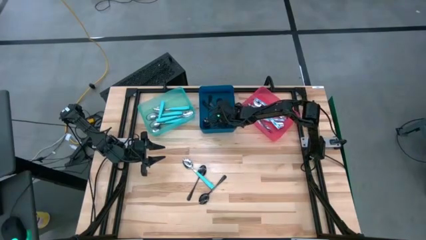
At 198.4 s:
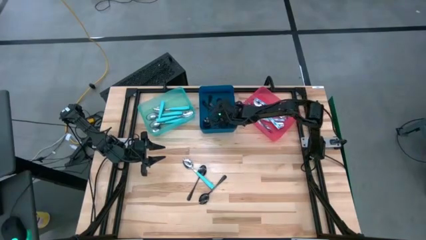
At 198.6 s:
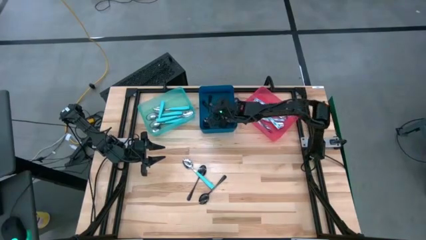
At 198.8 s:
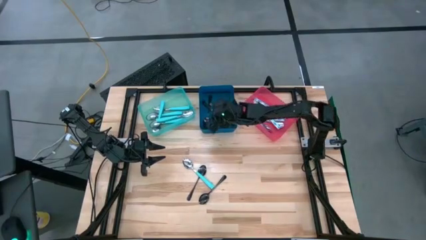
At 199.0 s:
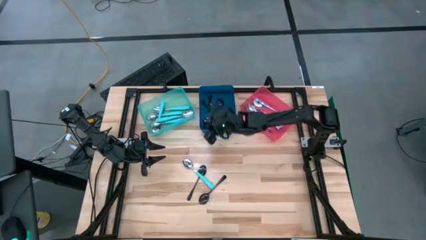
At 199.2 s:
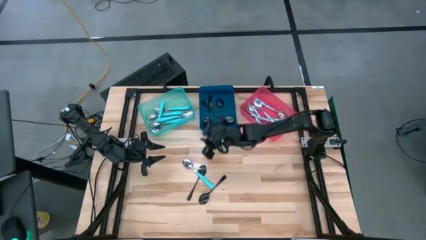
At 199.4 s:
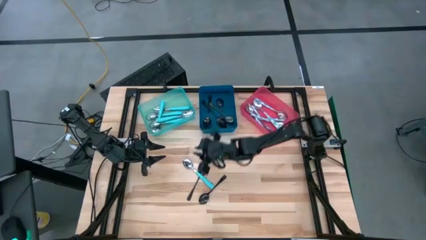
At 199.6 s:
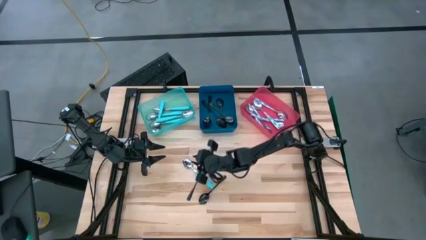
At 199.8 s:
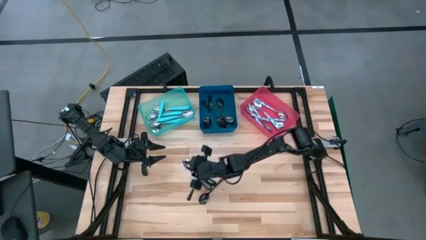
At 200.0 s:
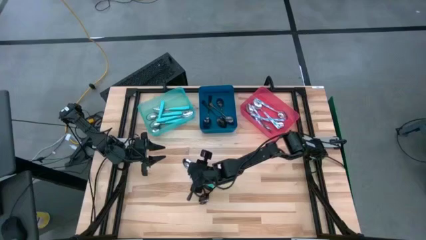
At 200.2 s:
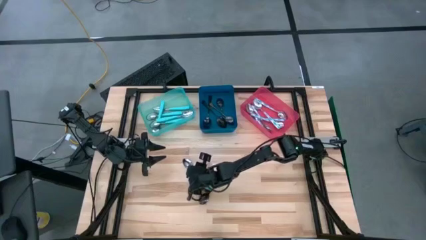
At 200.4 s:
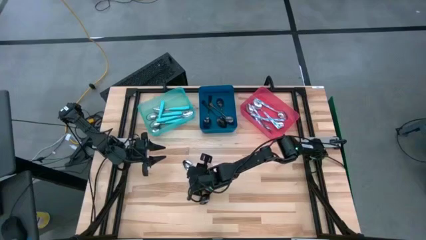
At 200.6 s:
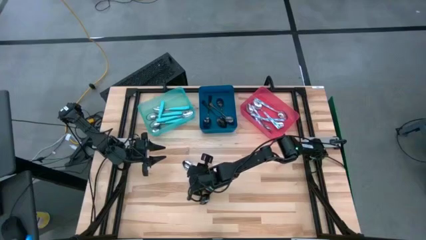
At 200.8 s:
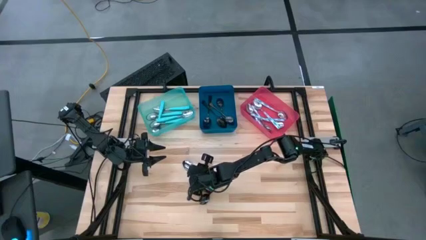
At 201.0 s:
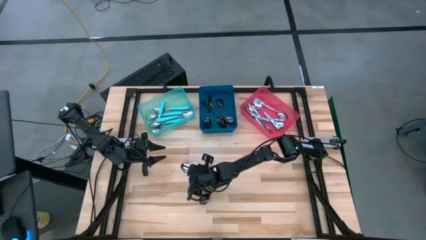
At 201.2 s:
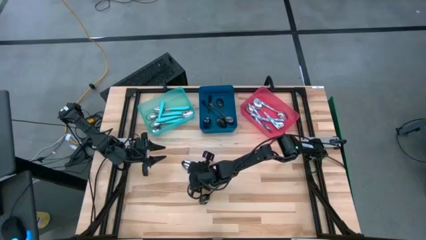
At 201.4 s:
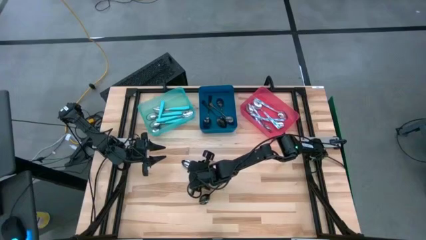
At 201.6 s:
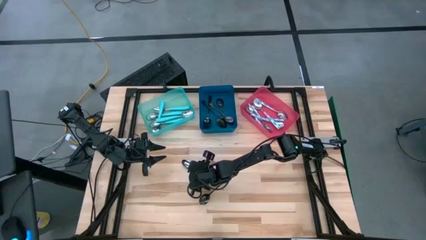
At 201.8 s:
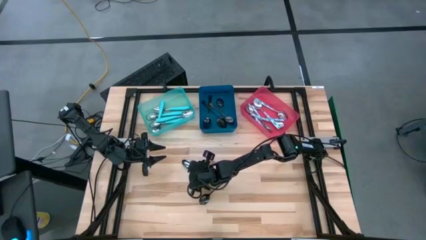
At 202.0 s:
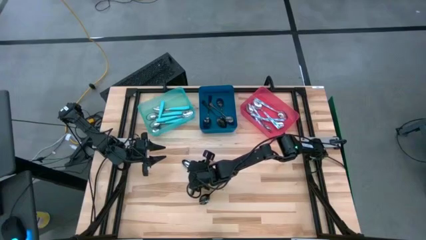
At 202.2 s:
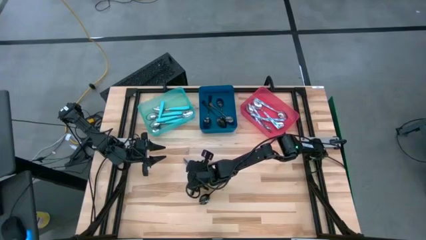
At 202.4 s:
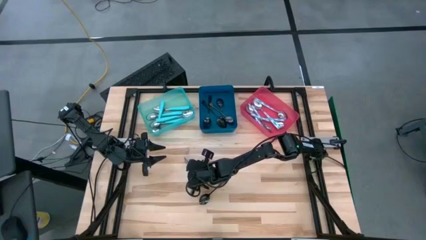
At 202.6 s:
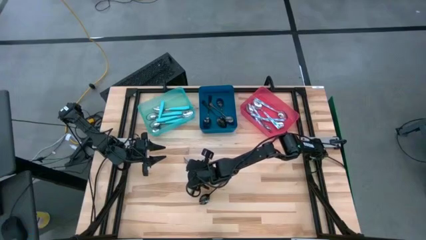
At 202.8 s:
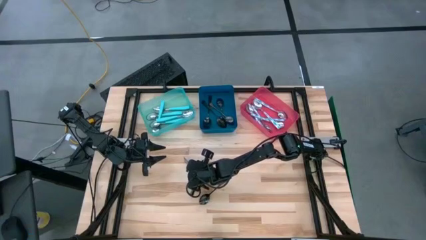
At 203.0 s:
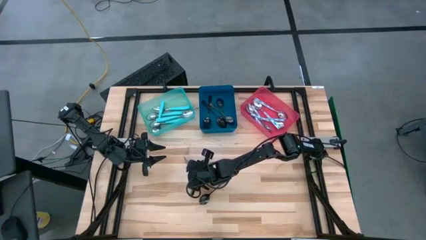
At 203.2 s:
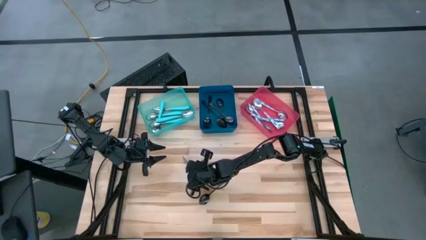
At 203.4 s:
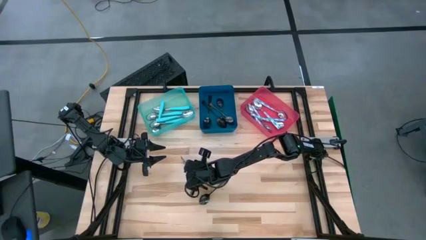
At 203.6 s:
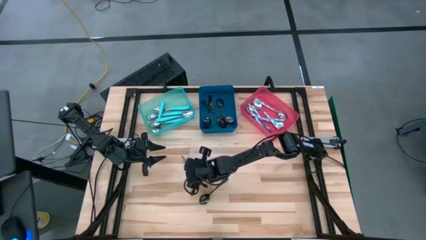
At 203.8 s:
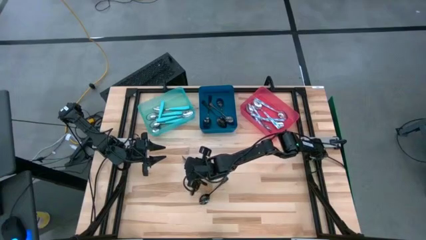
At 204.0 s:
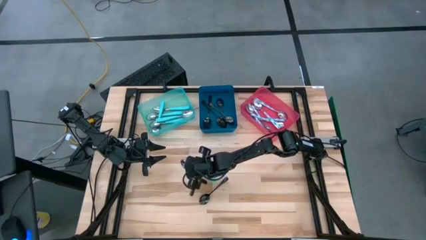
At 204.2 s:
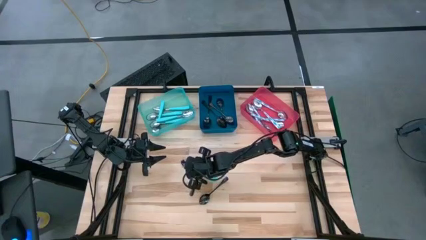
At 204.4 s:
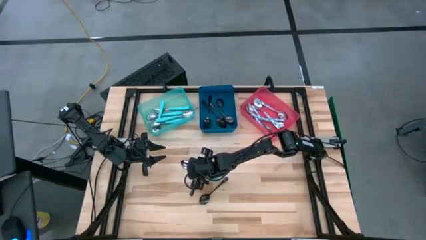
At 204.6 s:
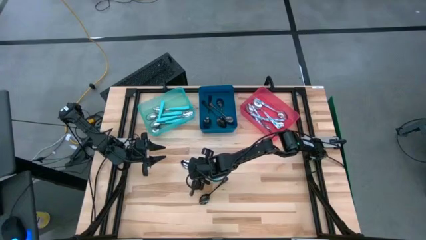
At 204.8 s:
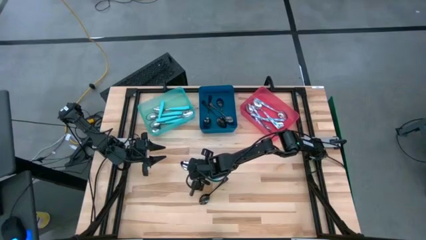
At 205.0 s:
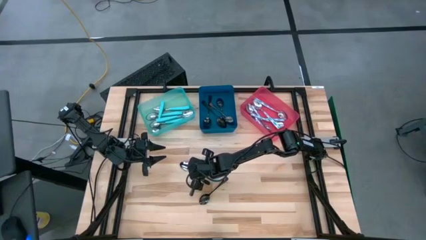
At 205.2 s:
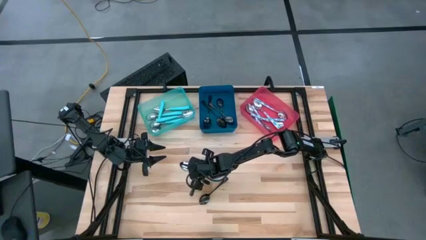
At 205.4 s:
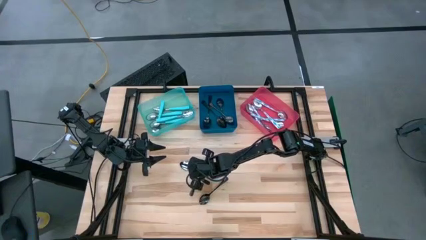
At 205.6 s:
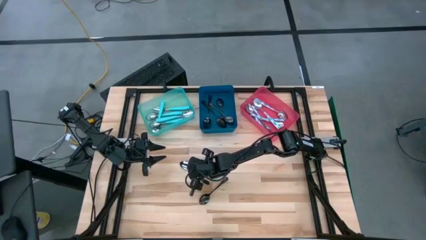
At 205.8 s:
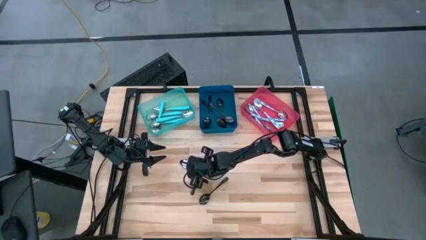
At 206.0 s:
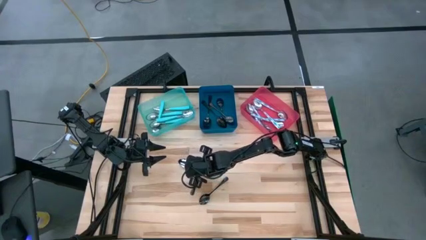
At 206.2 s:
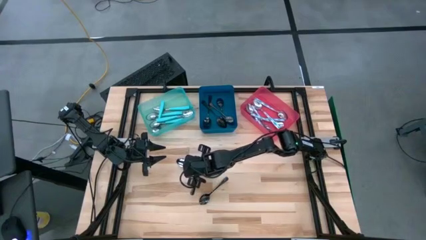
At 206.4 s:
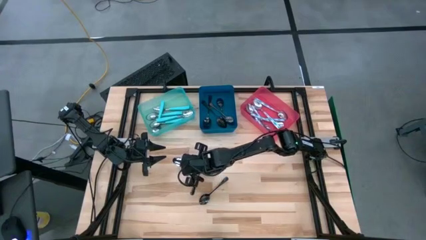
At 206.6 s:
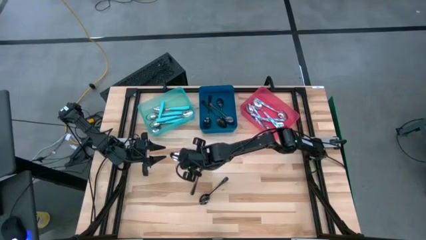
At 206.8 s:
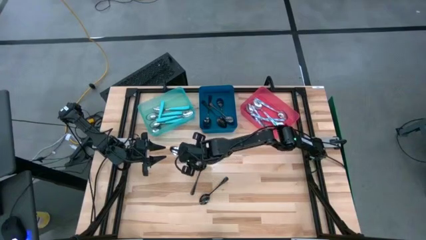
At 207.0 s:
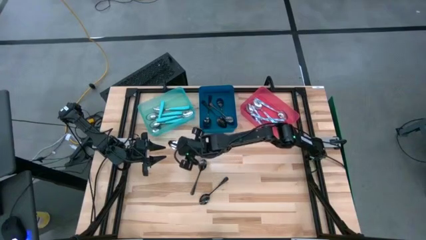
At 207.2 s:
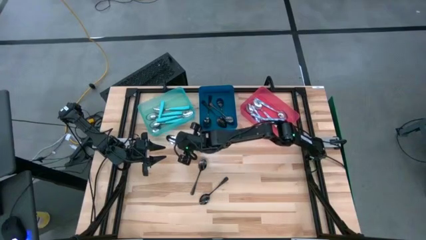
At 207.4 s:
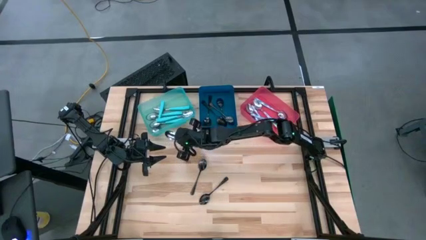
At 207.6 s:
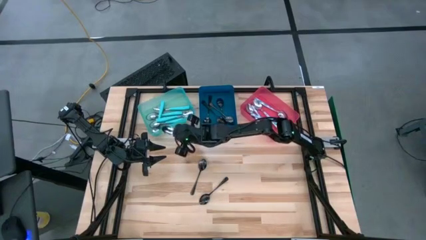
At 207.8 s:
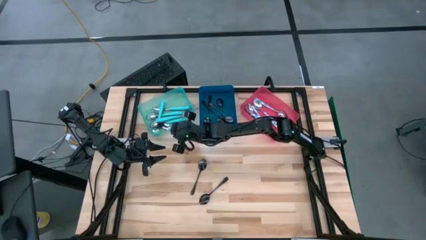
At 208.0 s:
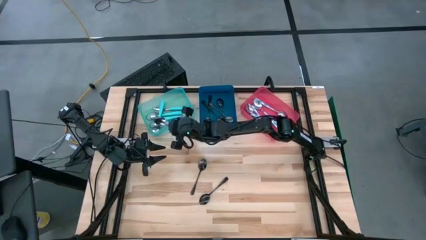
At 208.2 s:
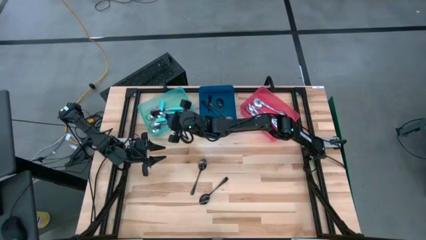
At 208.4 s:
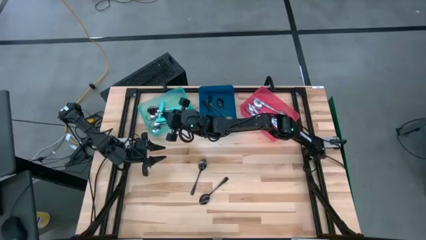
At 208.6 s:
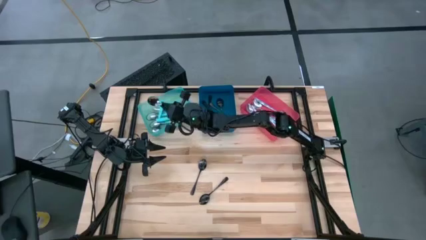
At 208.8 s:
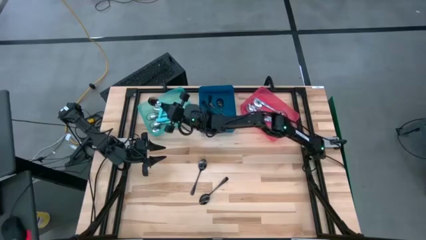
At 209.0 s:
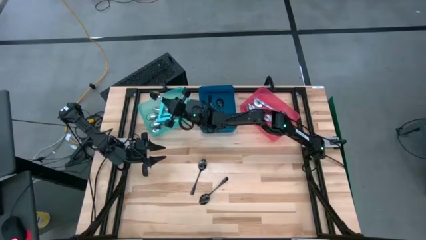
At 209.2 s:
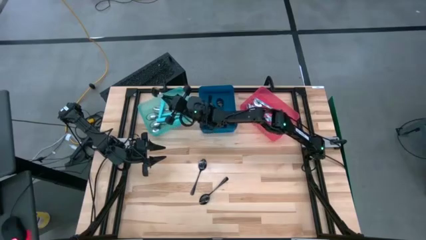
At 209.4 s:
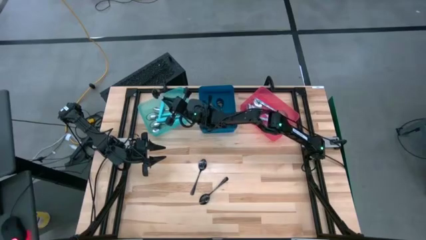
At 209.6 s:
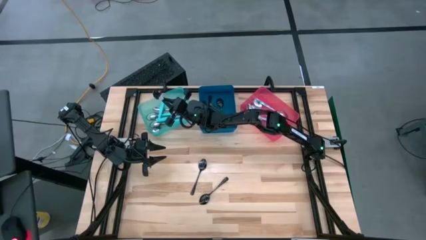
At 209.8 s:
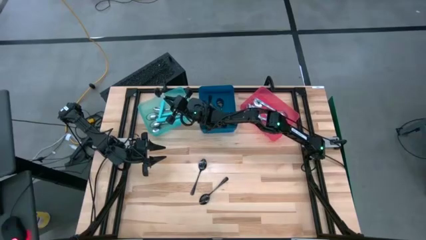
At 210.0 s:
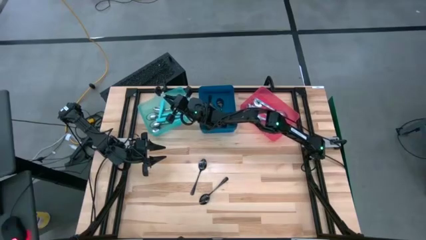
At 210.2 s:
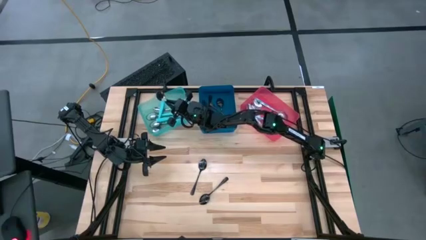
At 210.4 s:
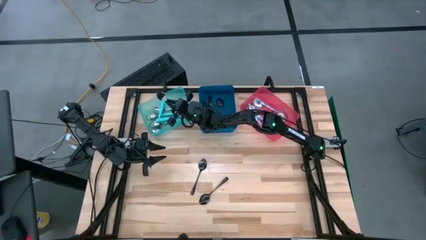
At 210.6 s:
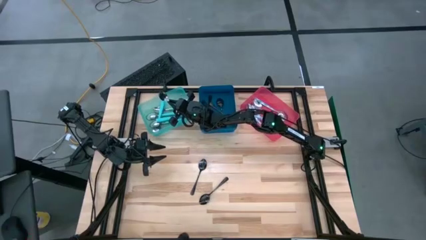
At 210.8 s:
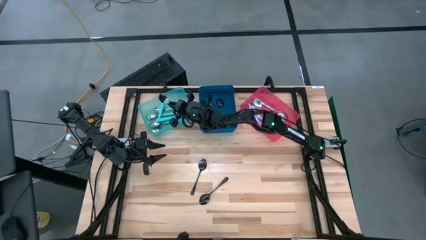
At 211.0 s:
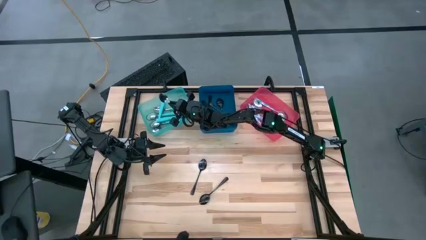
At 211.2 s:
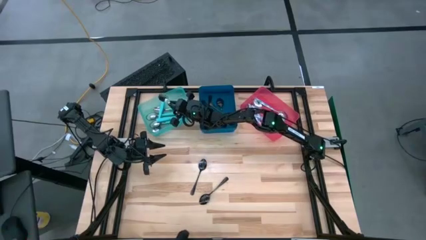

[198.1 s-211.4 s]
Task: Sort silverware by color (type)
Put the blue spoon into the light blue bin
